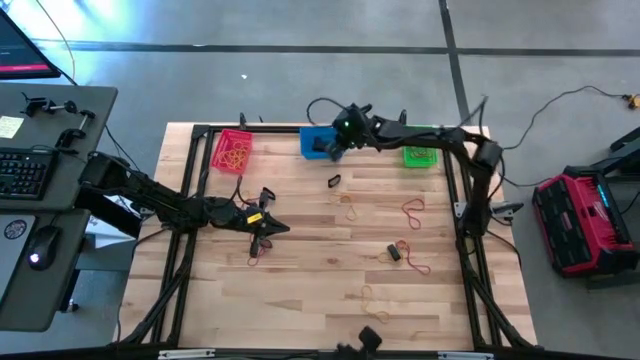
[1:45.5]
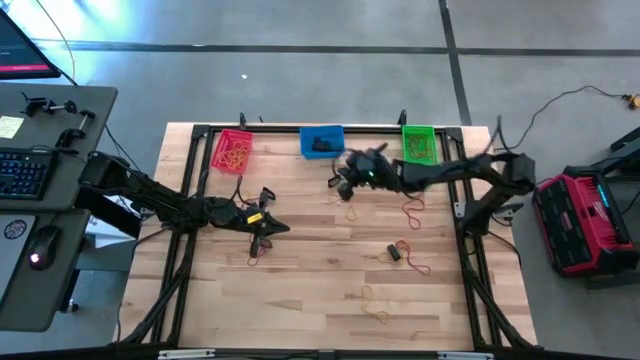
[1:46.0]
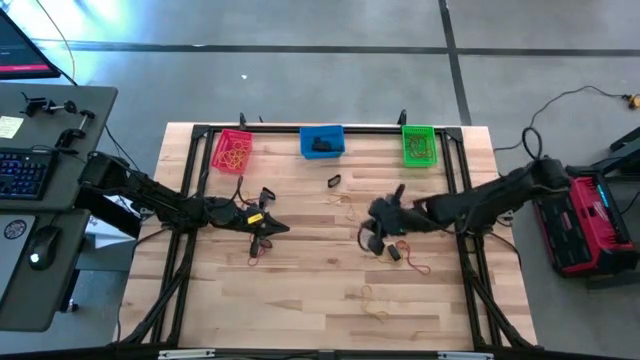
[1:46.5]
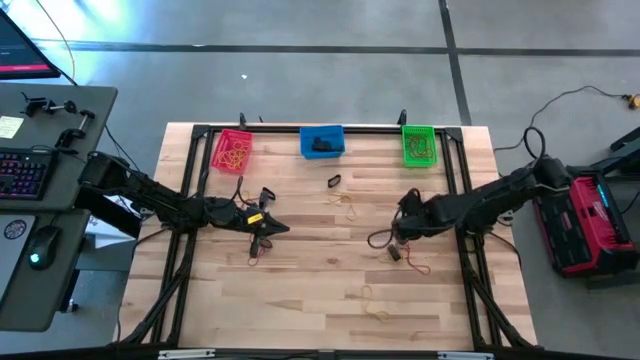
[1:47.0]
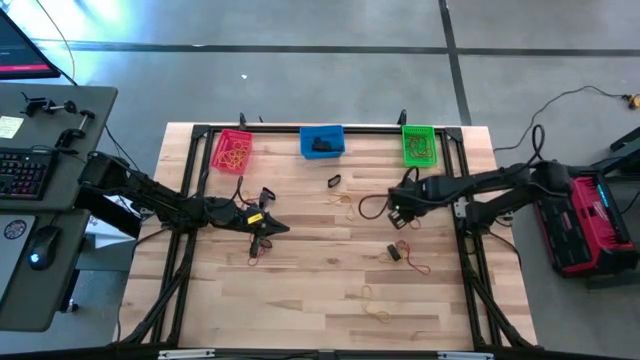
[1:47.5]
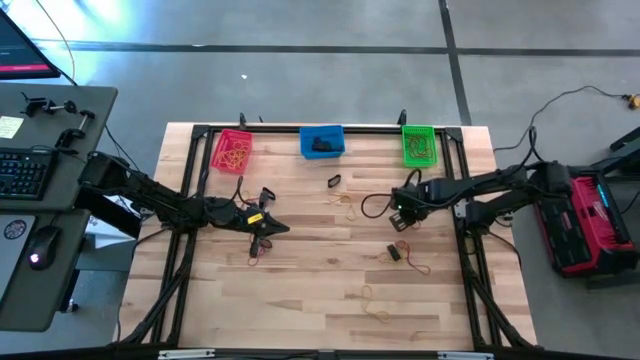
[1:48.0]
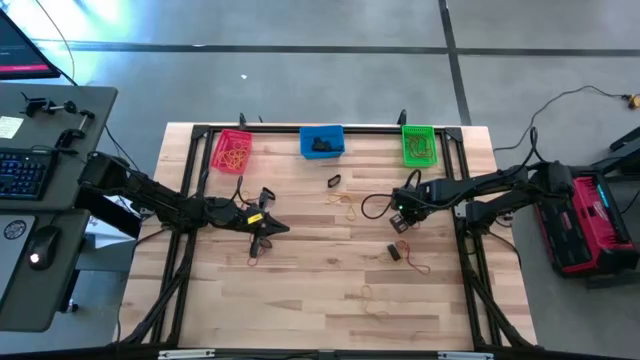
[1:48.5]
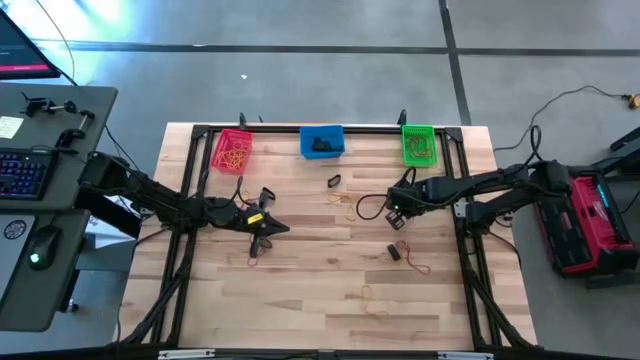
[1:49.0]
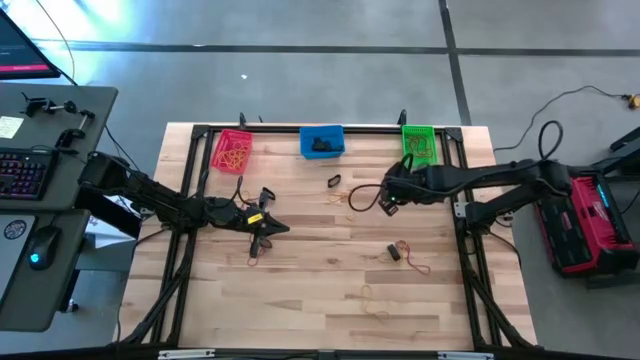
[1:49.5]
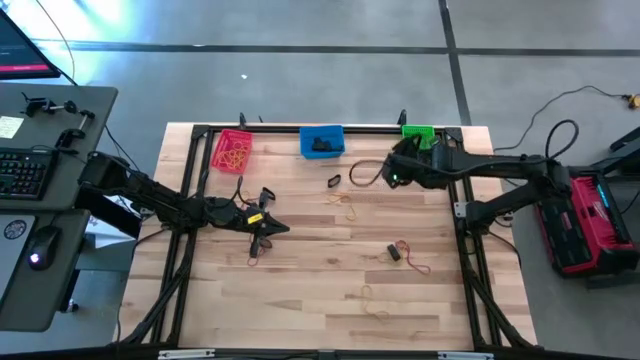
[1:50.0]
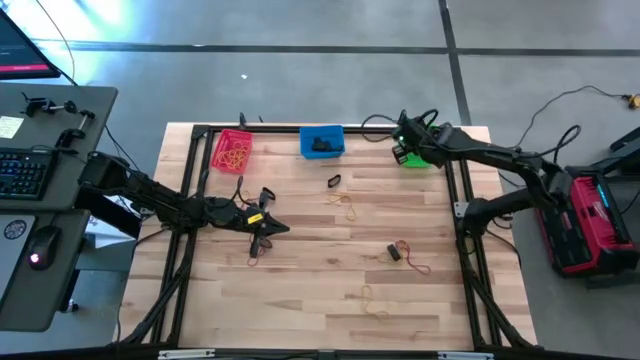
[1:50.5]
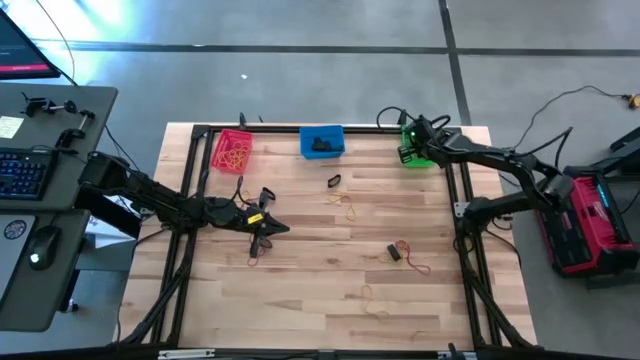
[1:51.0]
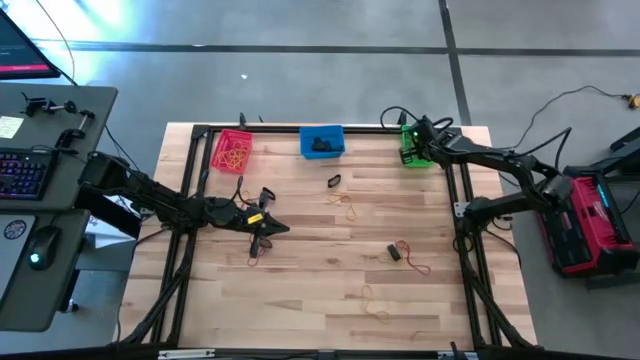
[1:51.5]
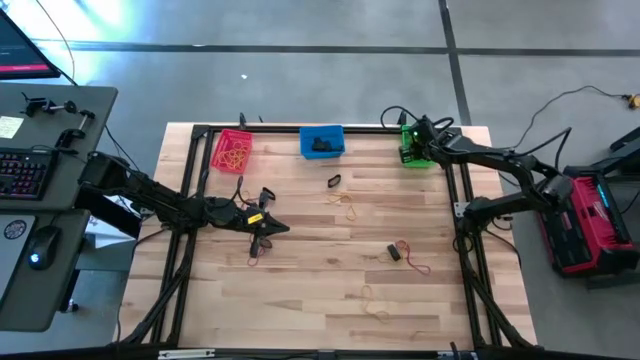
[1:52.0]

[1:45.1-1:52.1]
Task: Sort rubber bands into baskets
Put the red rubber band into the green bin

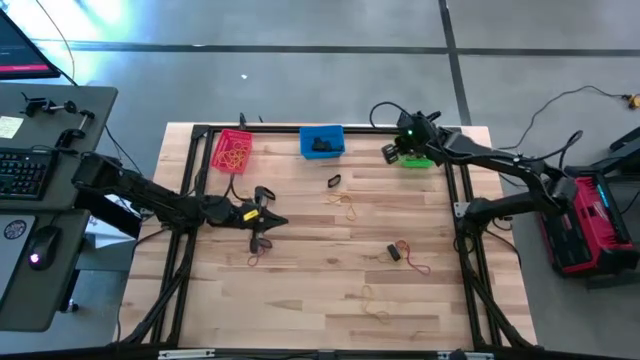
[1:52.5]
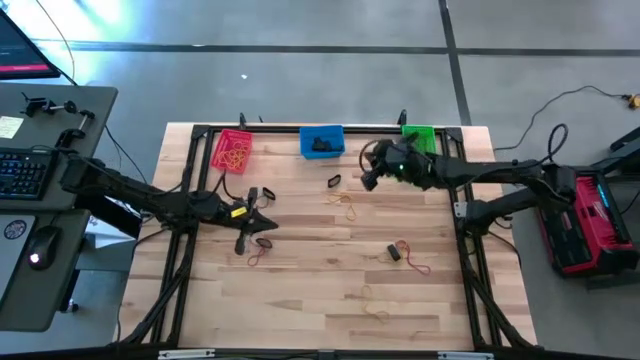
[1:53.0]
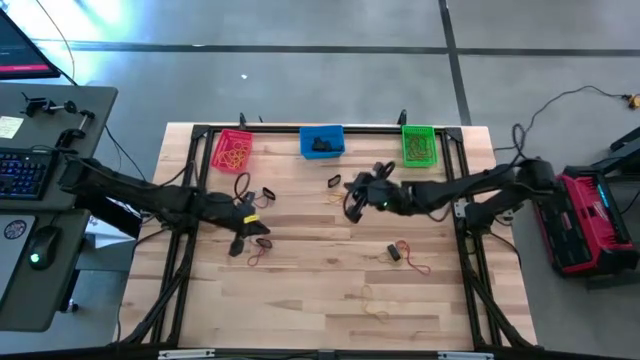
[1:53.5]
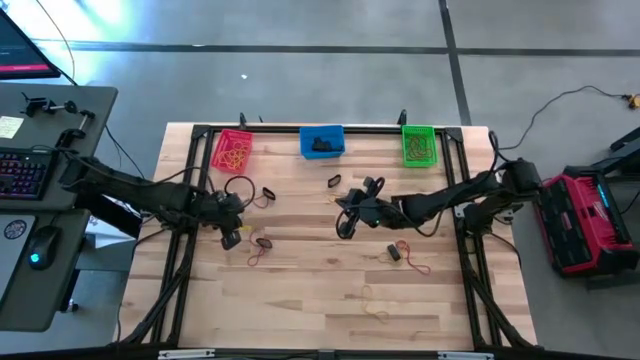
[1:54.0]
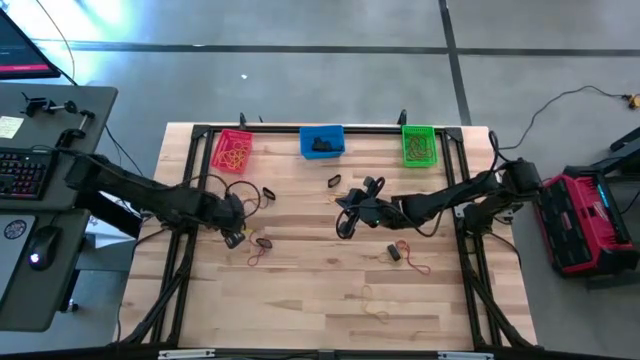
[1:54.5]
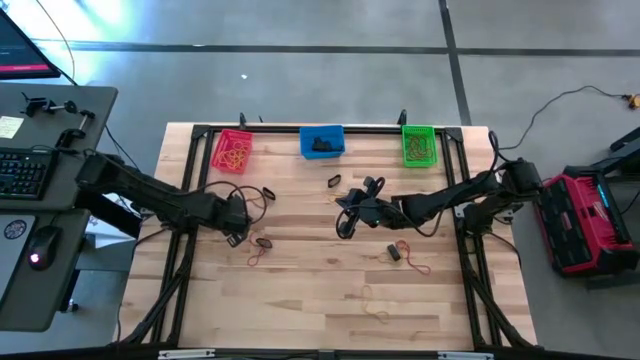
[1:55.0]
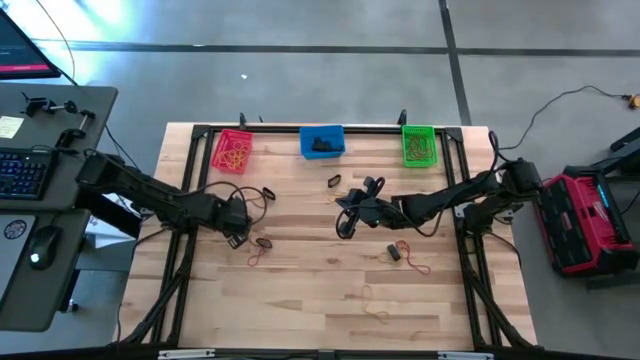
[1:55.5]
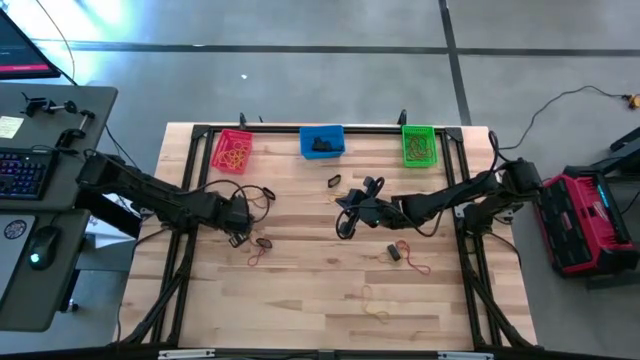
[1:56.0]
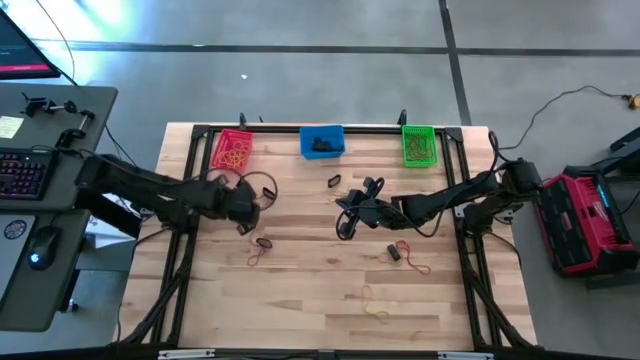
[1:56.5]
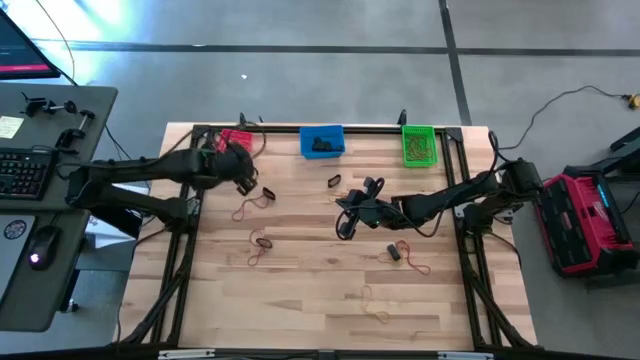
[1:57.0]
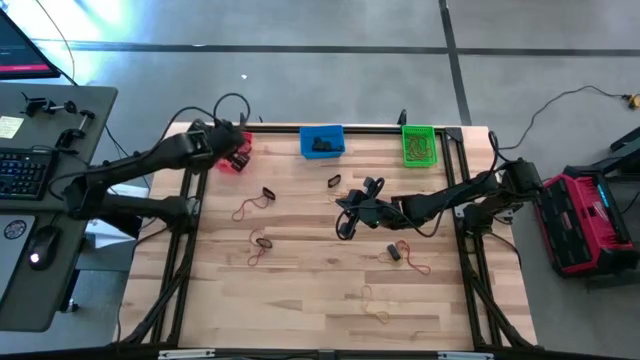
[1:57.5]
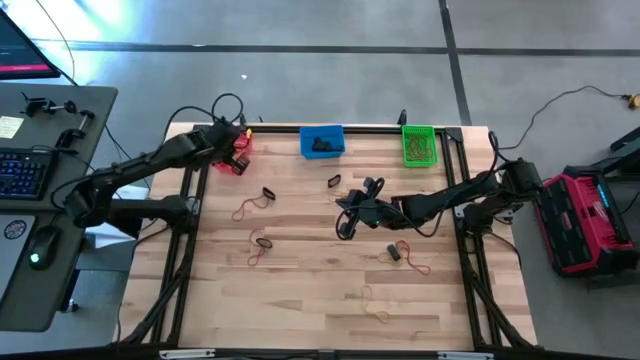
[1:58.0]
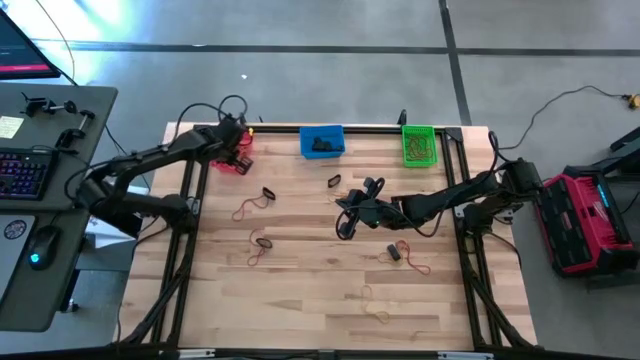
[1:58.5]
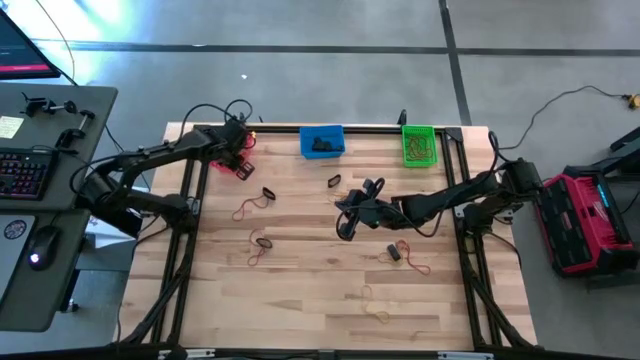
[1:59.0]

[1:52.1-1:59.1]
Put the yellow rubber band into the red bin

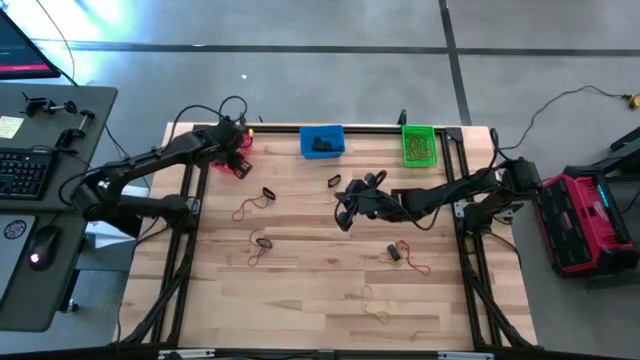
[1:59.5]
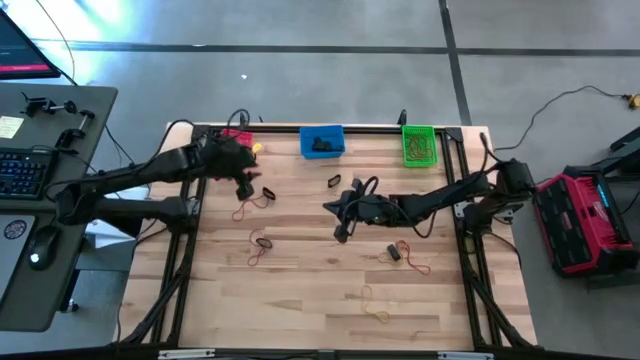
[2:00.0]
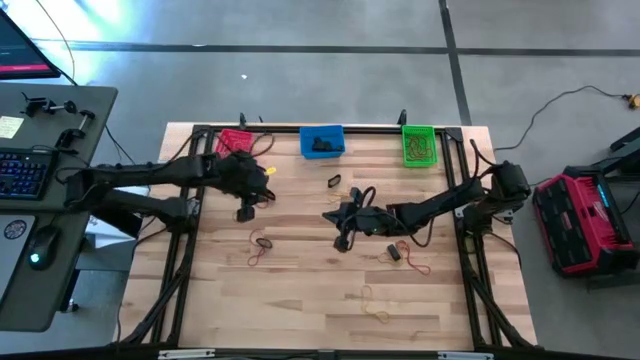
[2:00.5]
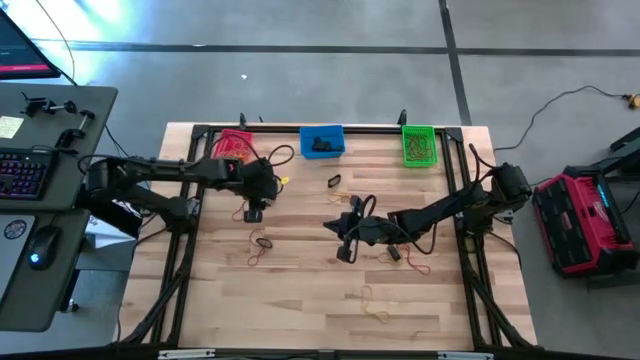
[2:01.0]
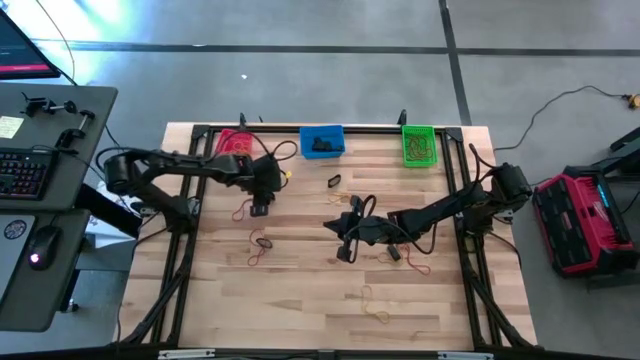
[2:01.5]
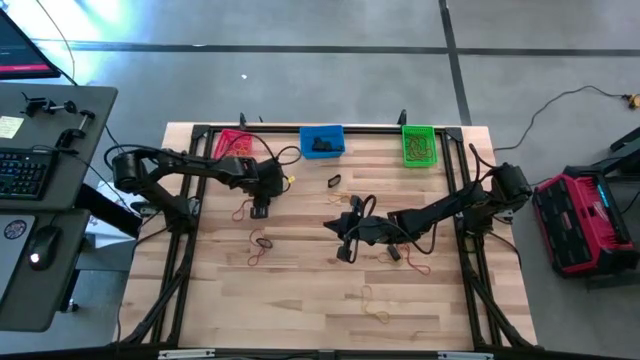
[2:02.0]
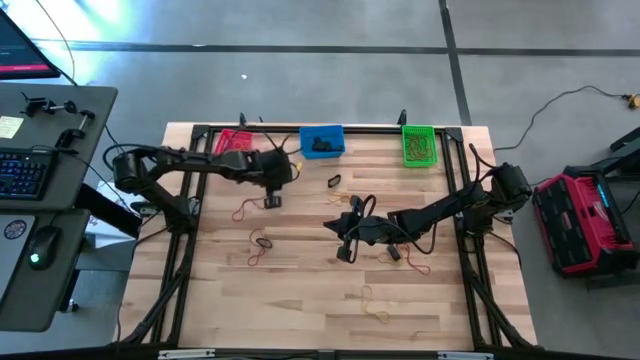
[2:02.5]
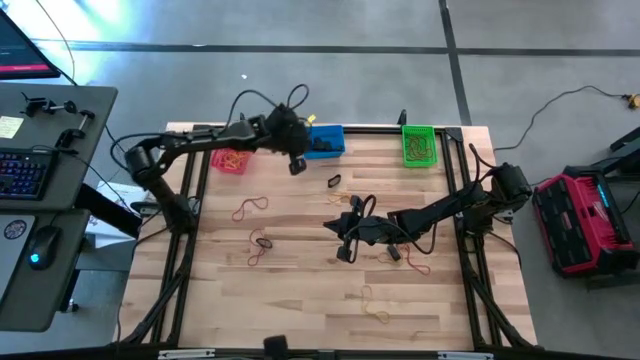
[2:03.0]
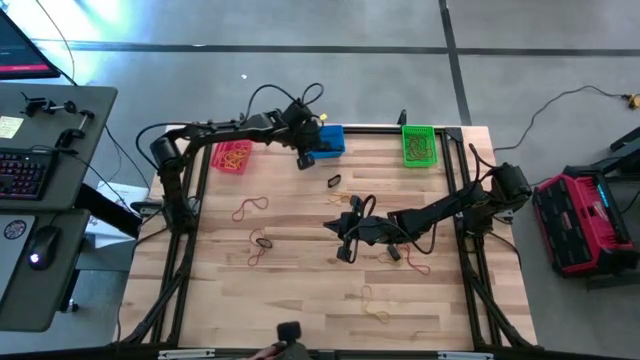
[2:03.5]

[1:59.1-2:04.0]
Put the black rubber band into the blue bin

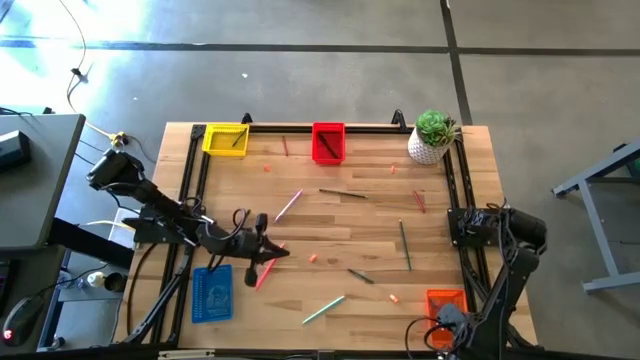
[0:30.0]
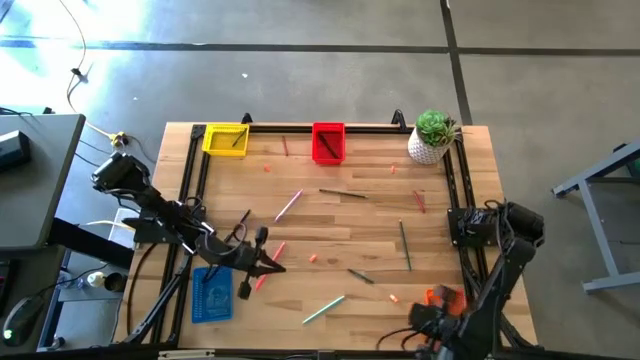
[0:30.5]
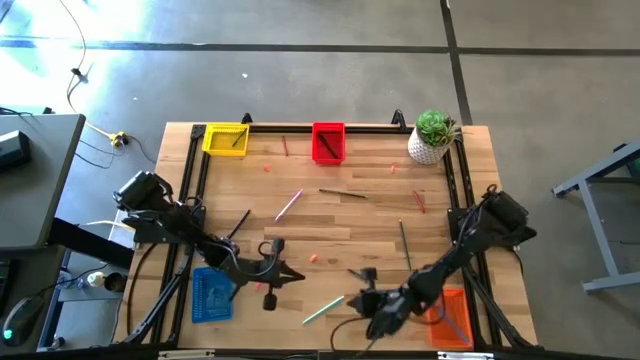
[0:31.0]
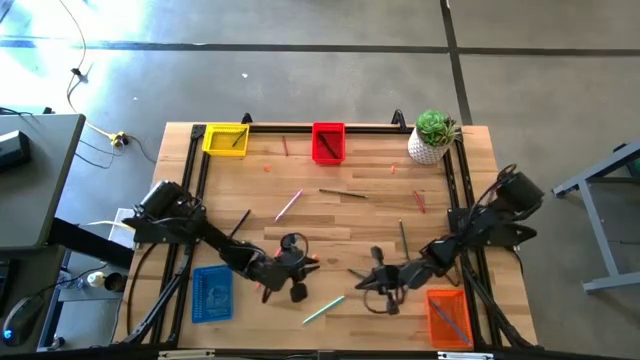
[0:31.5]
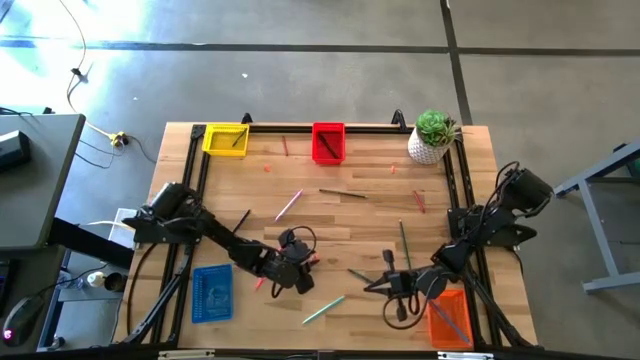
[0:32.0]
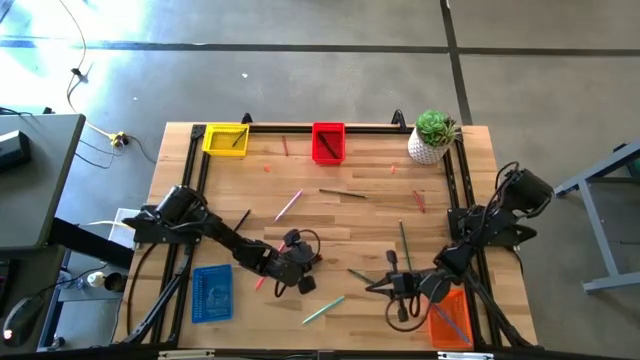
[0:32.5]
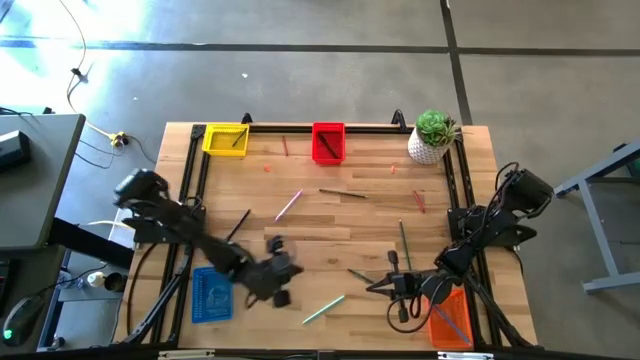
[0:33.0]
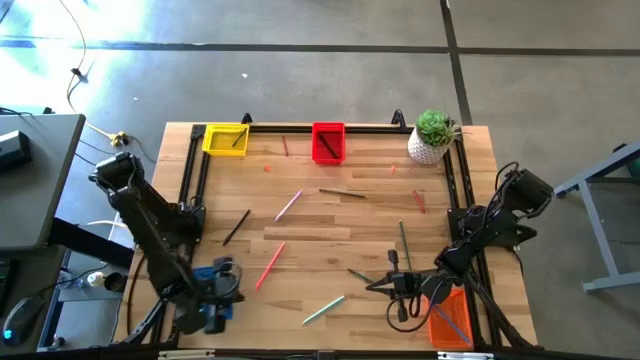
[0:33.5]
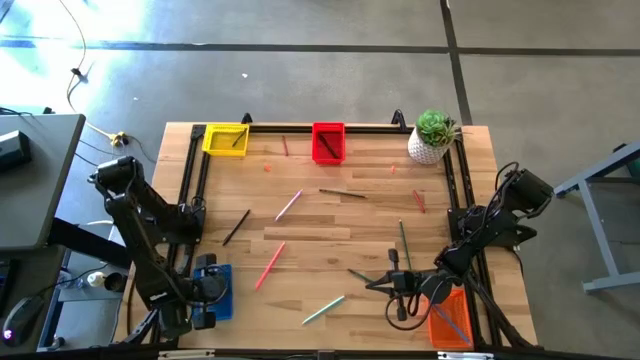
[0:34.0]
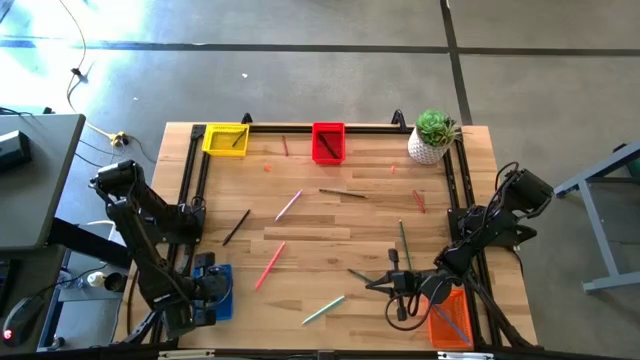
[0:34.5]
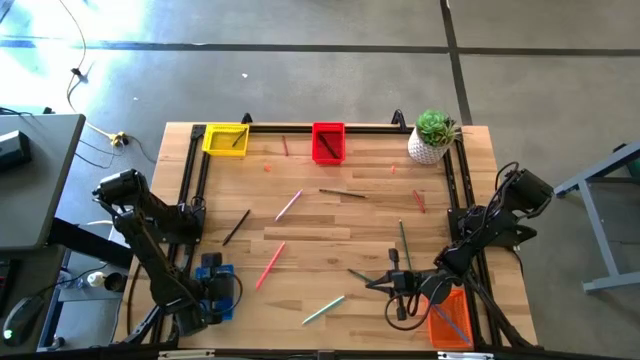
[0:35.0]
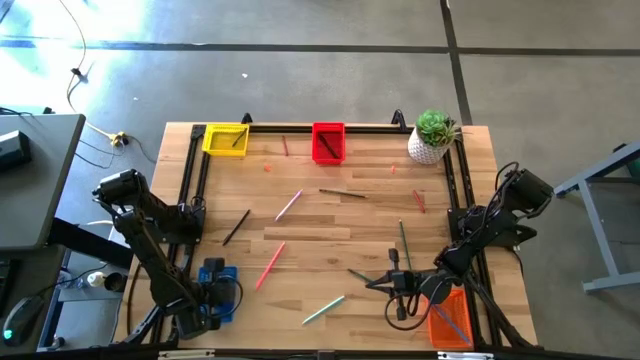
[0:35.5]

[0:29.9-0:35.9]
Task: Sort crayons/erasers/pens/pencils in bins
Put the middle left orange eraser into the blue bin
